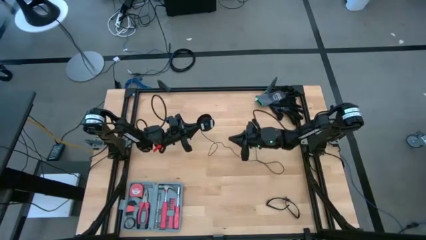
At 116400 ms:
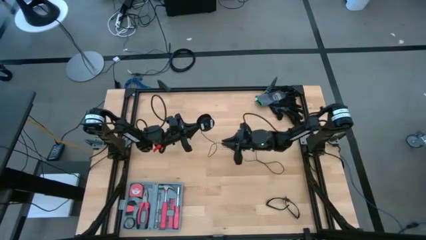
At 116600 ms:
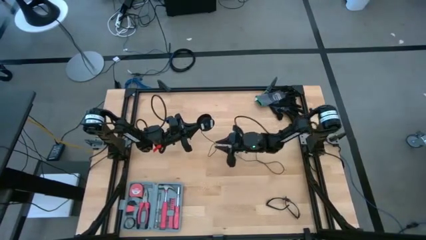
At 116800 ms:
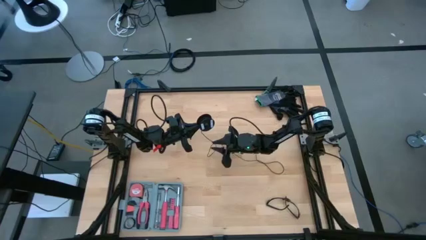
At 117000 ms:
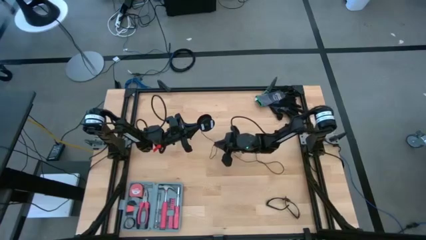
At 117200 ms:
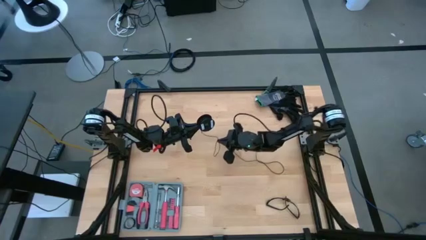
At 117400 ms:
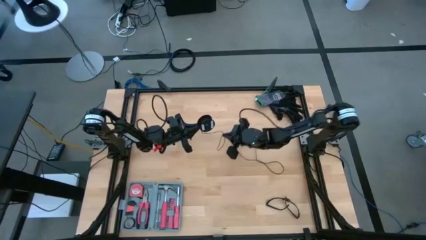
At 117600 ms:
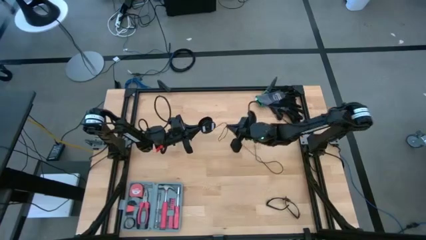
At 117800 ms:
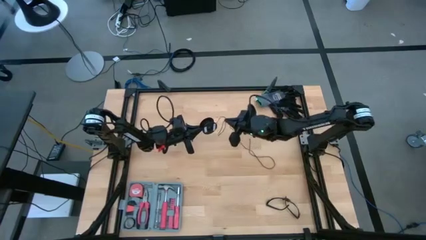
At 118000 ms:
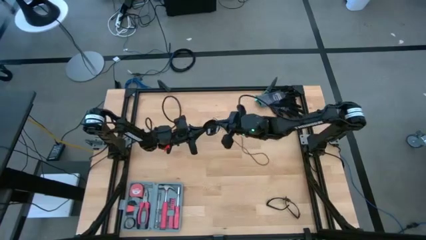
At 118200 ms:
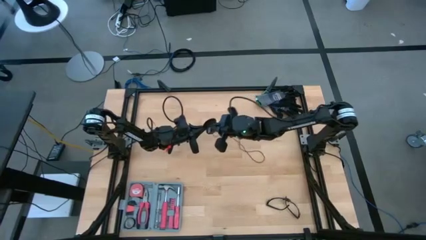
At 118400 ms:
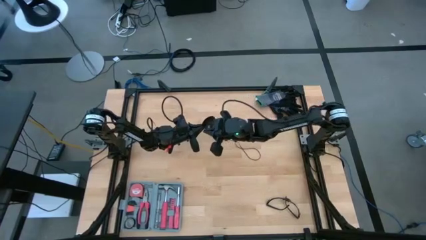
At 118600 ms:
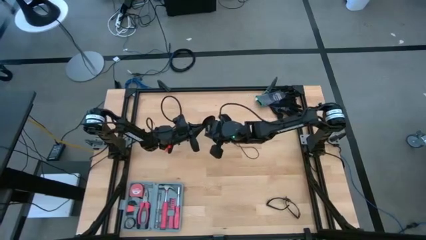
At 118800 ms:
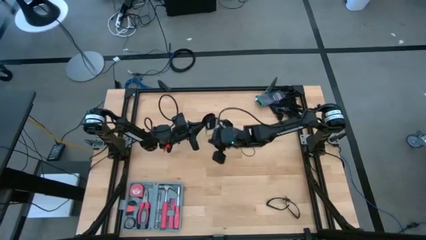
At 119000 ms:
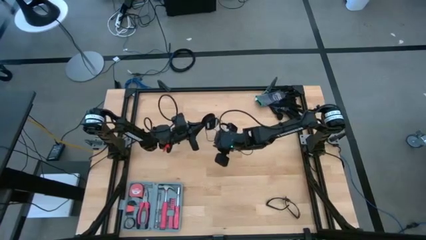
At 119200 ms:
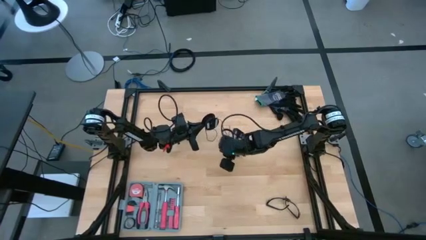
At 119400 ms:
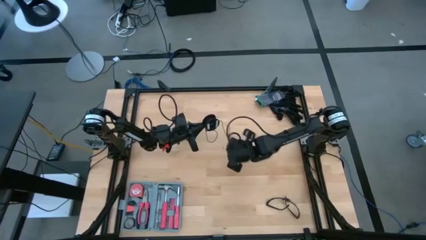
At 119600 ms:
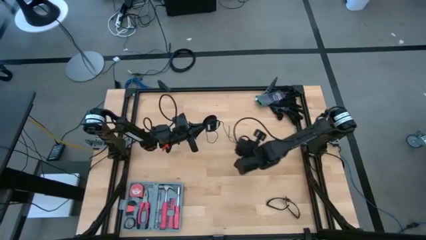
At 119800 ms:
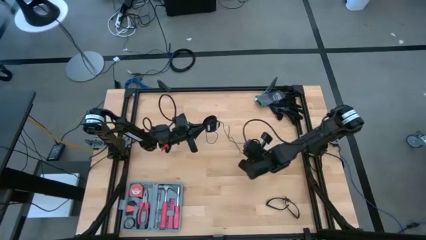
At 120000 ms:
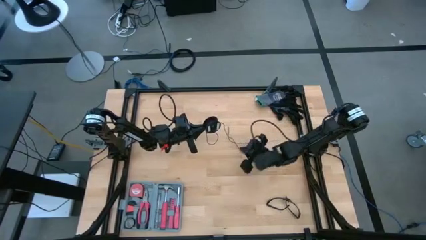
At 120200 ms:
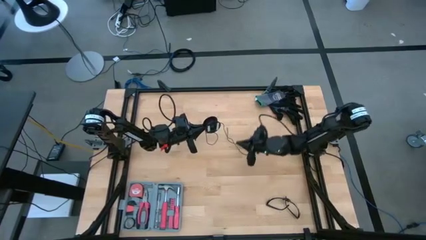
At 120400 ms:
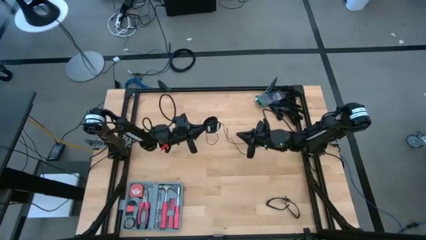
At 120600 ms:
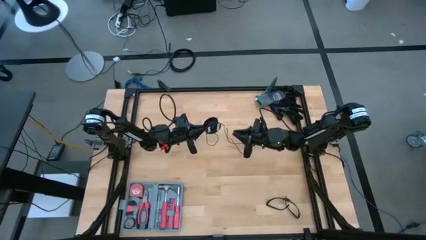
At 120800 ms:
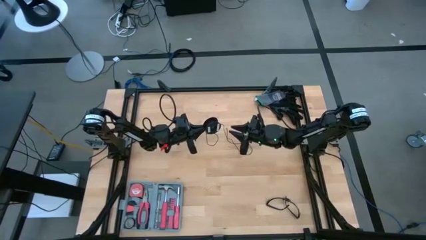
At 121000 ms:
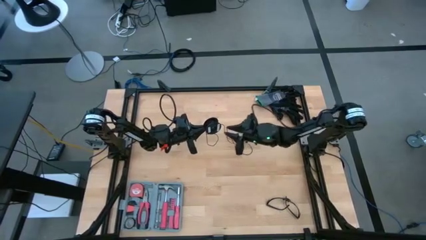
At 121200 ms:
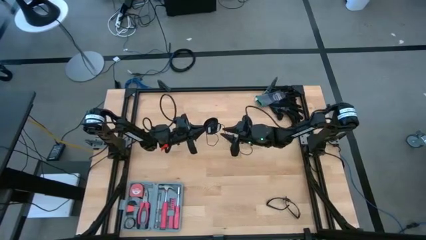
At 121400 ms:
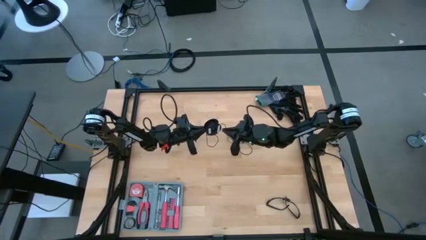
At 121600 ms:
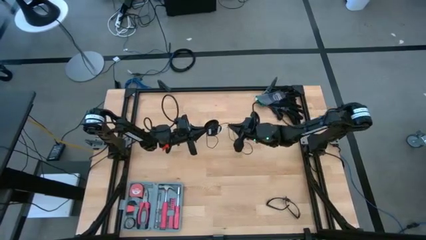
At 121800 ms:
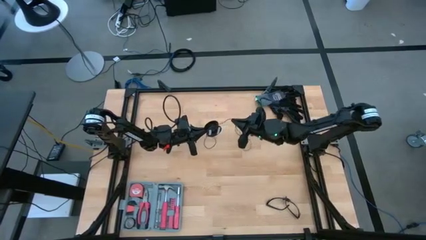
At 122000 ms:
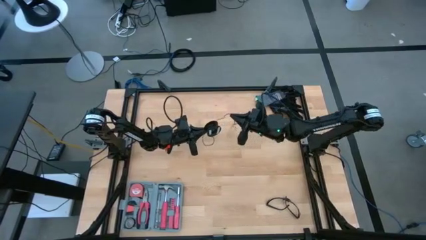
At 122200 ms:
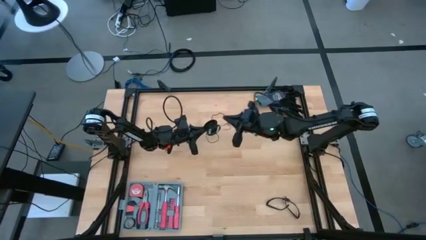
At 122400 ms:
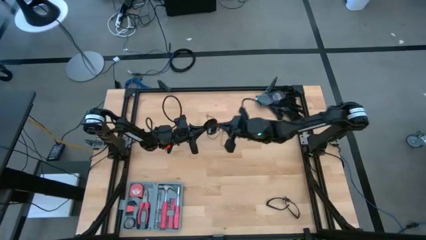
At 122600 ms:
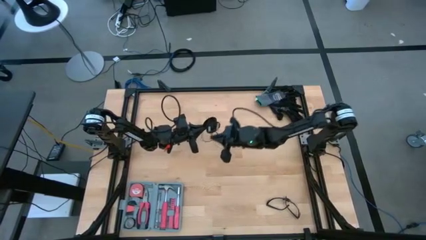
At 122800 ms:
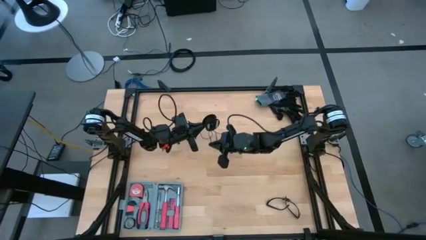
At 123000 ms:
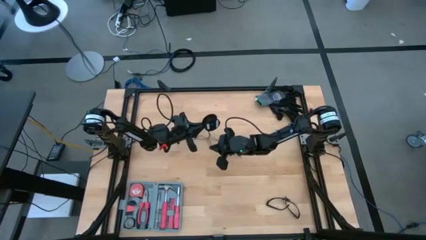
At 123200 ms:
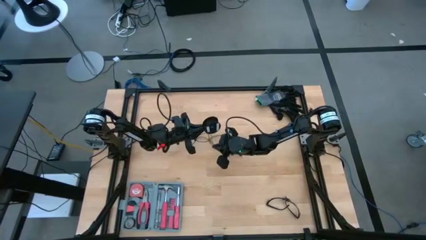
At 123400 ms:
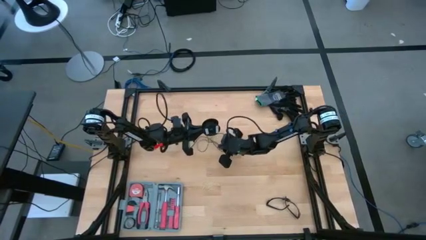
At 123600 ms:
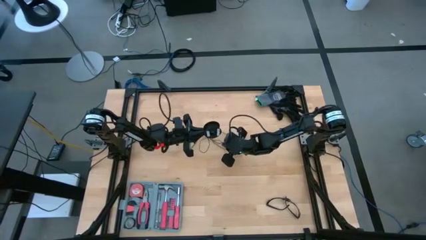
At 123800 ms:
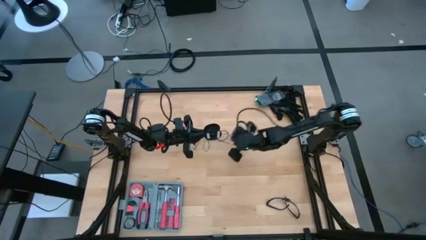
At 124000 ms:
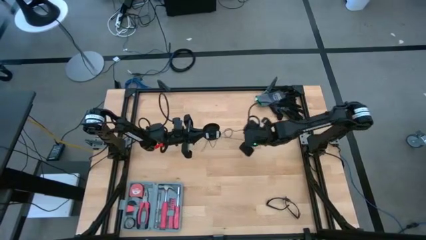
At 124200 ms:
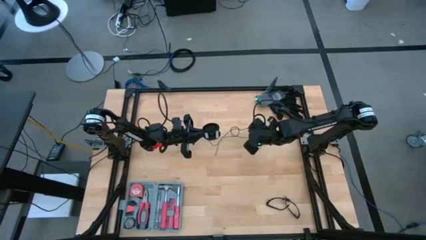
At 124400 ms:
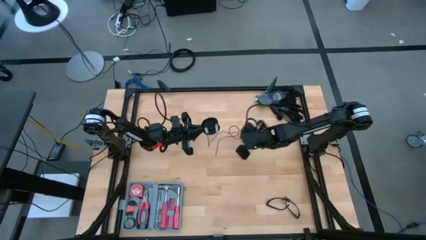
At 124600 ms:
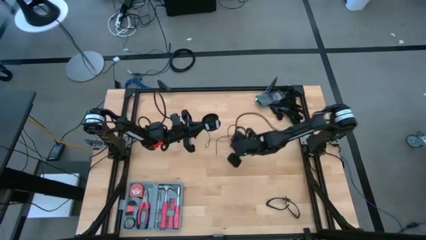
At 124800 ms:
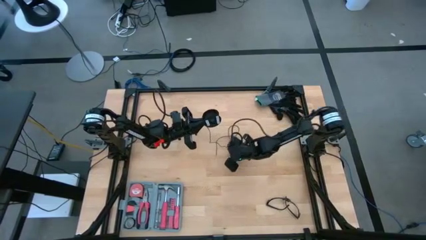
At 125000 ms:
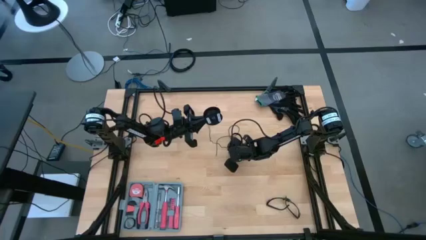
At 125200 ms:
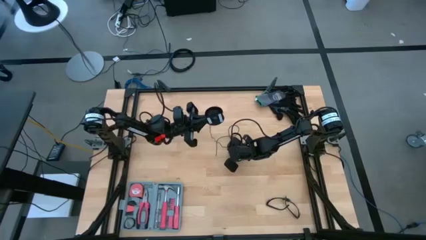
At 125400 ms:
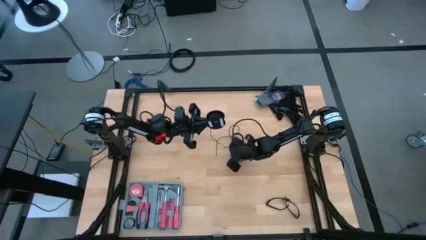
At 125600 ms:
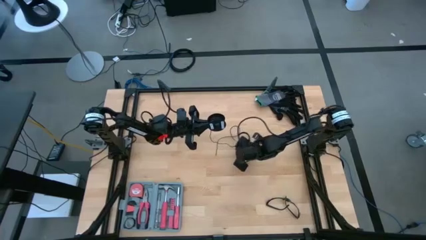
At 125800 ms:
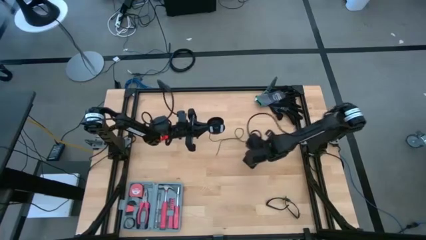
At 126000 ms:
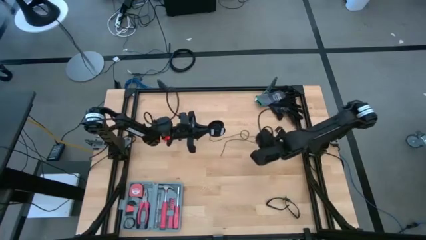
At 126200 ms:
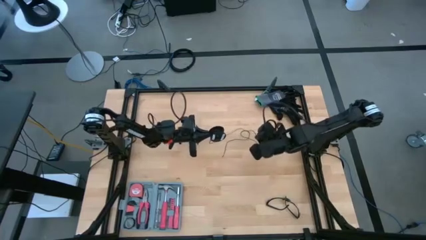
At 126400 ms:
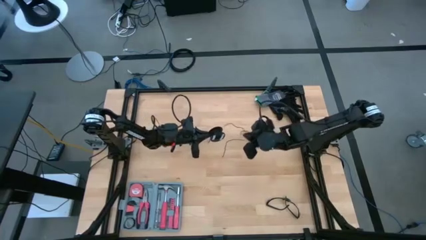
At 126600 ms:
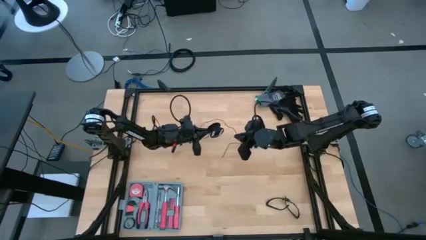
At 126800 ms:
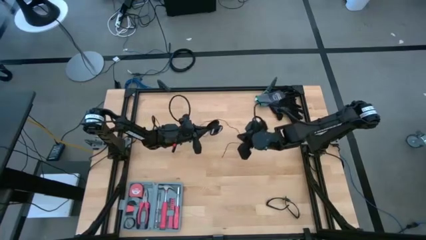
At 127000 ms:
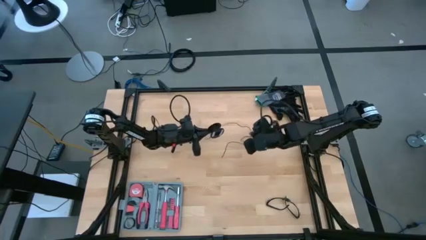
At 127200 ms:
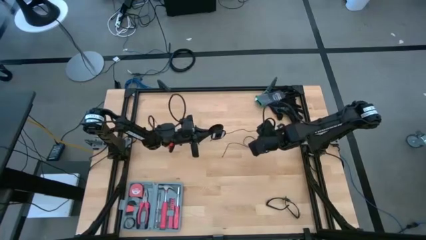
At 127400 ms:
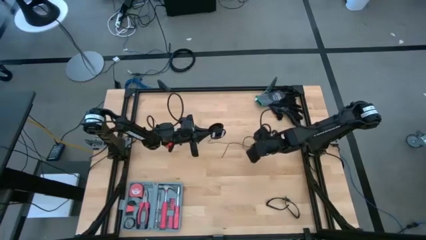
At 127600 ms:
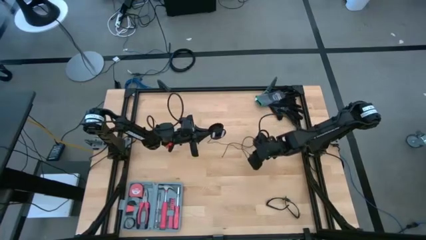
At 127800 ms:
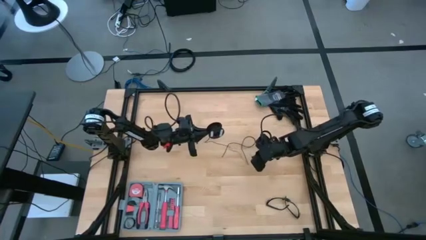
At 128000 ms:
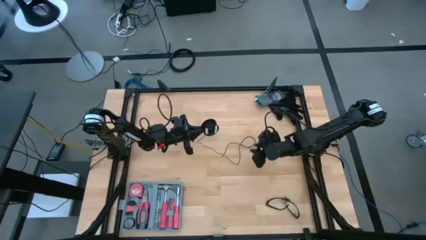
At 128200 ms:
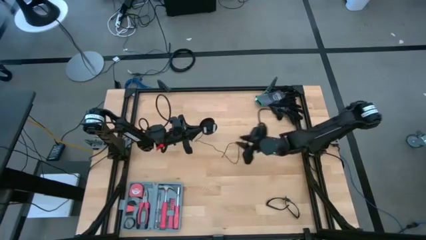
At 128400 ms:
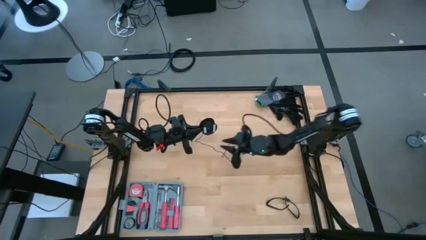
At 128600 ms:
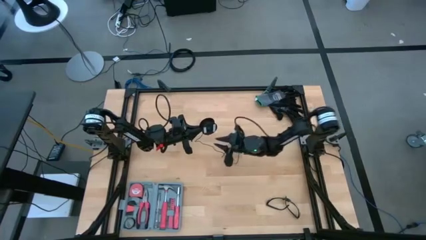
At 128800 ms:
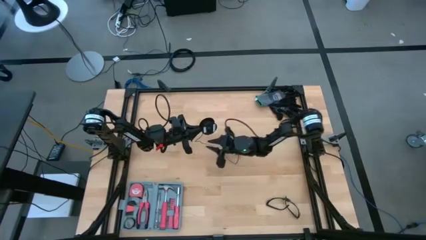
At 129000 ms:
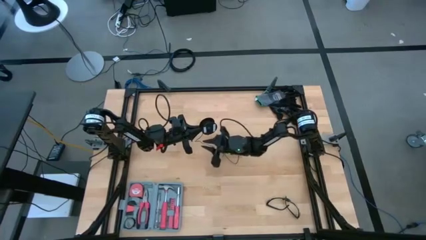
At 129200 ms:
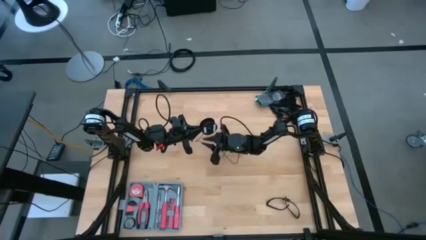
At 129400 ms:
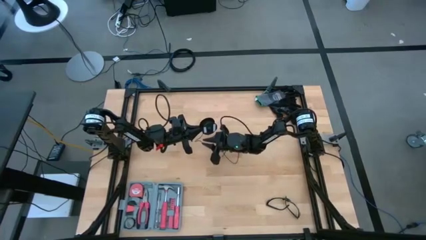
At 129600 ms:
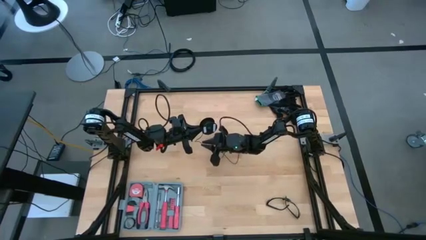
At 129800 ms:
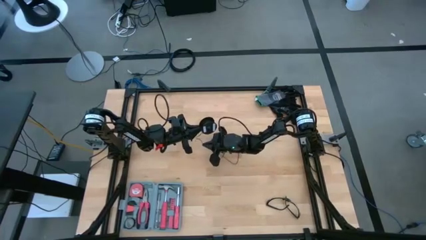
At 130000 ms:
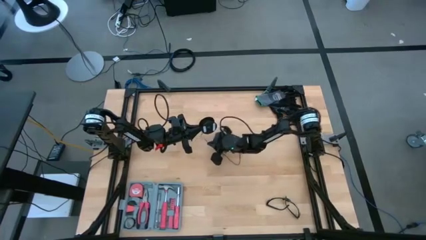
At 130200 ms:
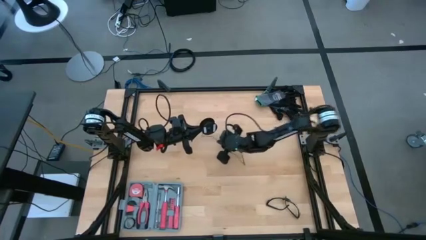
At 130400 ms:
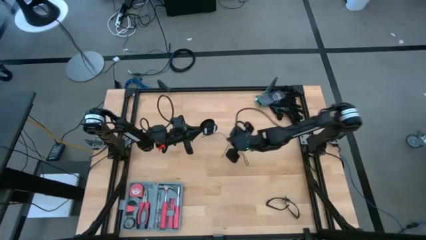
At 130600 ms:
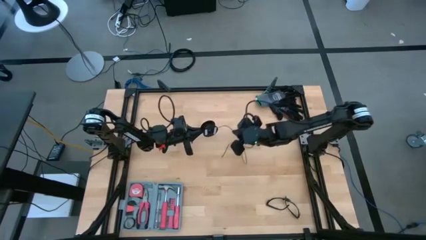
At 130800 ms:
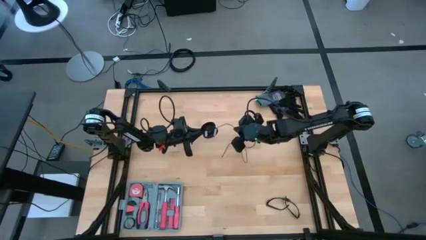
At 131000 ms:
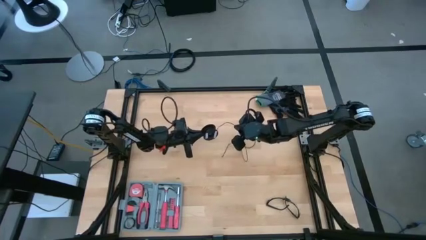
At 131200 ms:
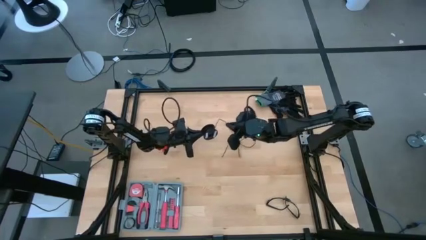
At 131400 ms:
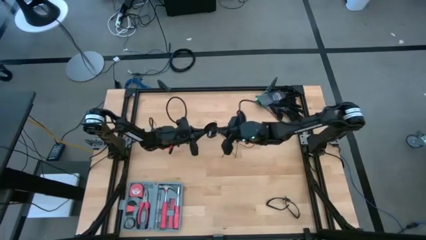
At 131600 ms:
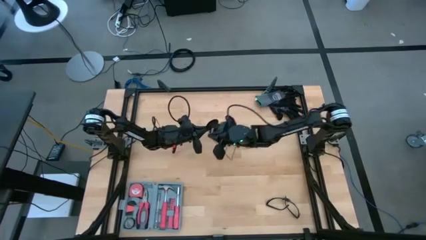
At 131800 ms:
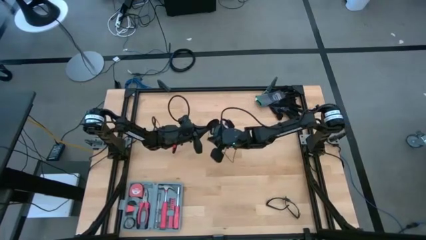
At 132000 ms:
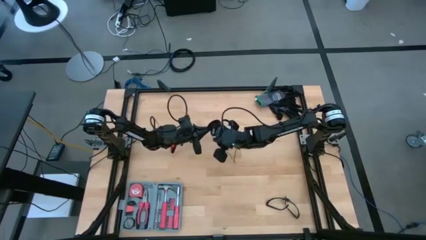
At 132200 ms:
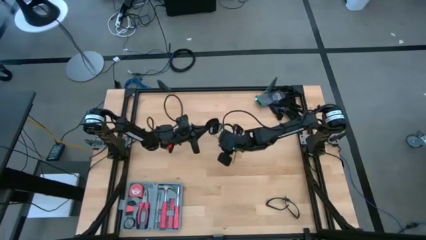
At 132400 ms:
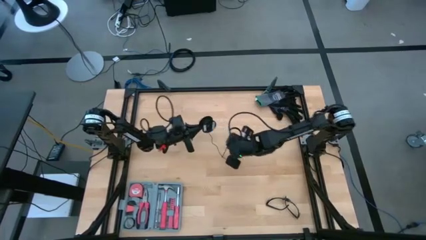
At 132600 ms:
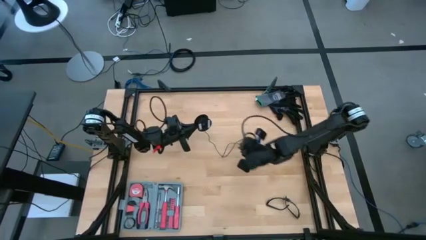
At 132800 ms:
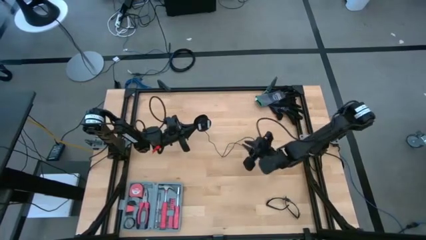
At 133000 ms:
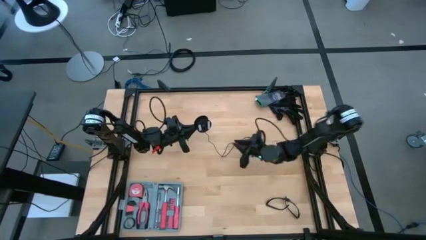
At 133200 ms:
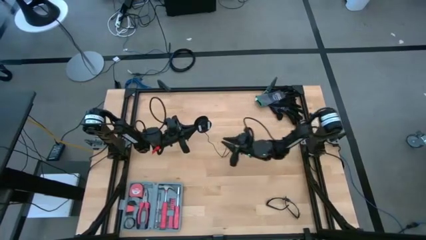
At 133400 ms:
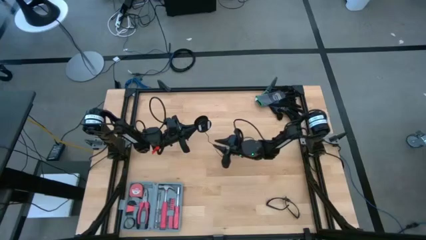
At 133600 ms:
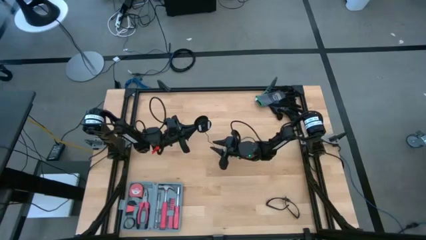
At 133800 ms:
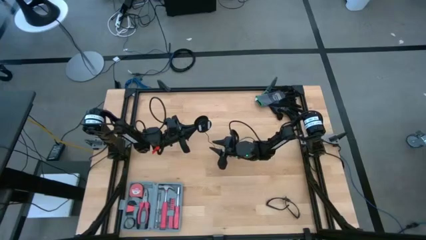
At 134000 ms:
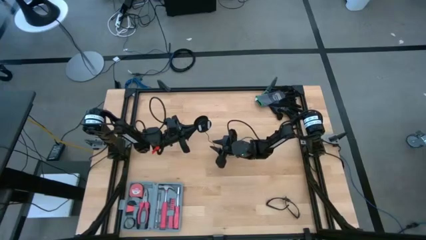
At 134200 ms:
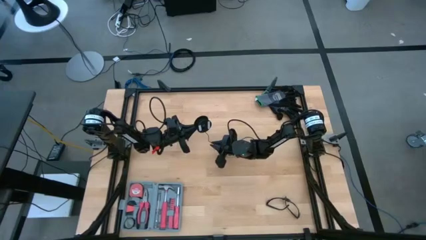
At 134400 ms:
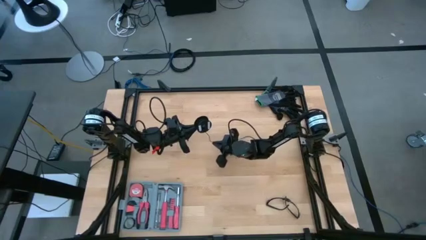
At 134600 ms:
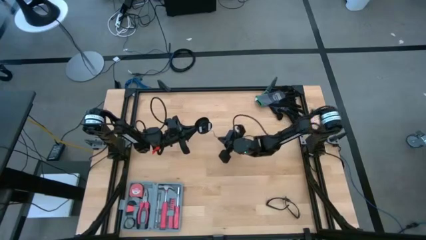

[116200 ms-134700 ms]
Task: Coil cords
Coil the black wire onto the spool
